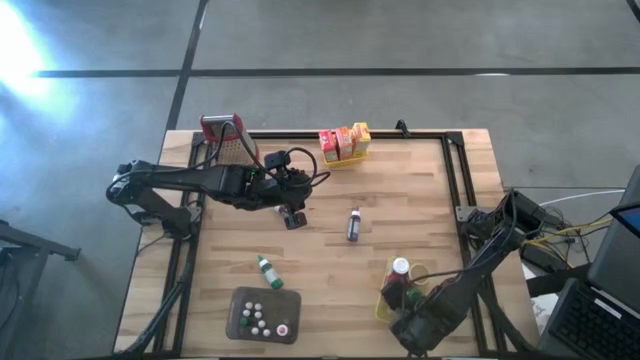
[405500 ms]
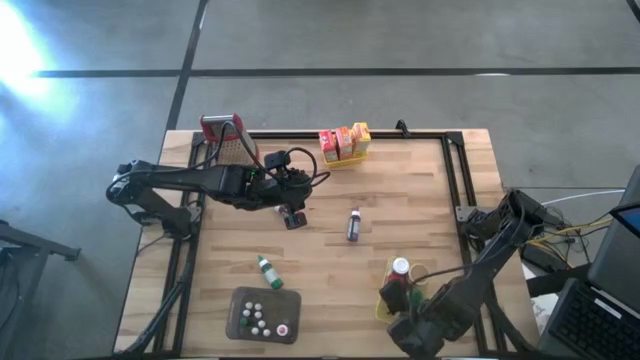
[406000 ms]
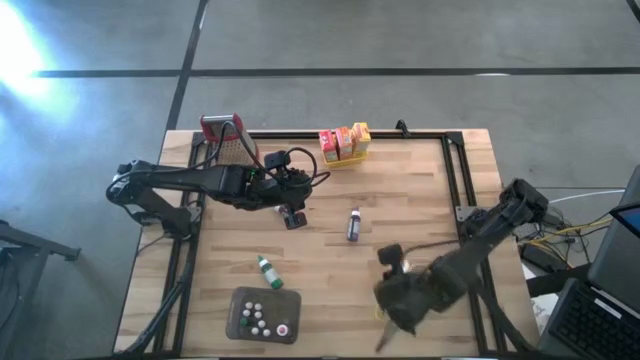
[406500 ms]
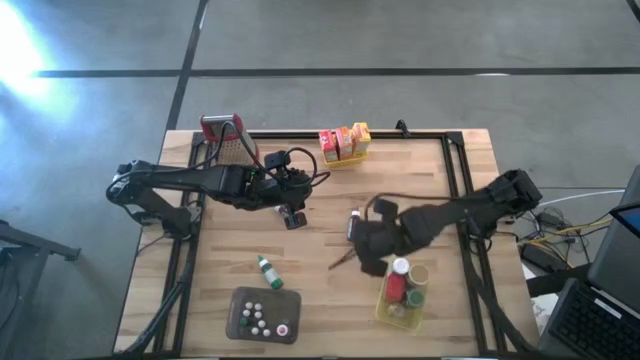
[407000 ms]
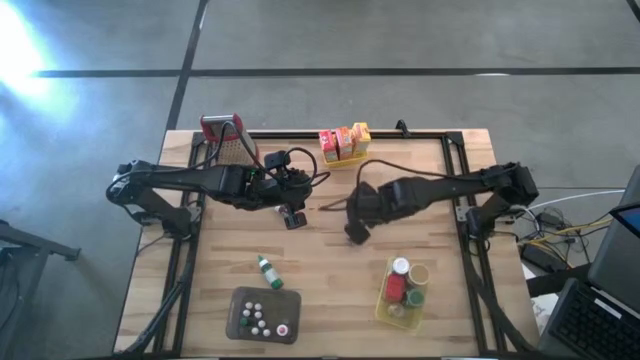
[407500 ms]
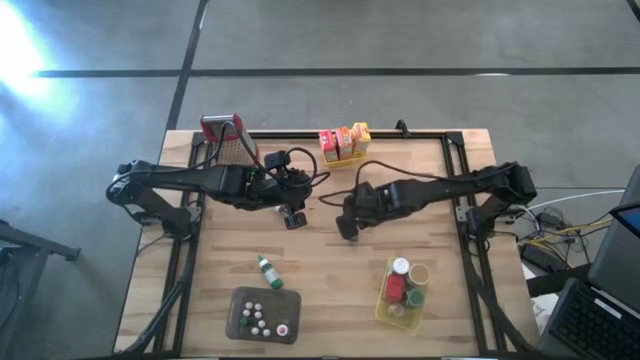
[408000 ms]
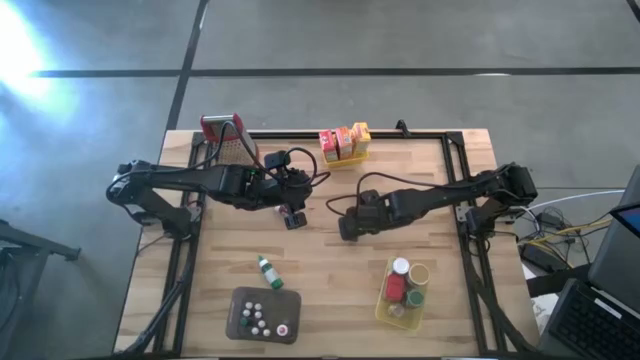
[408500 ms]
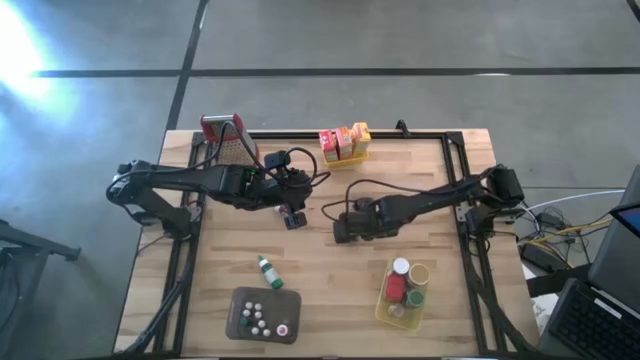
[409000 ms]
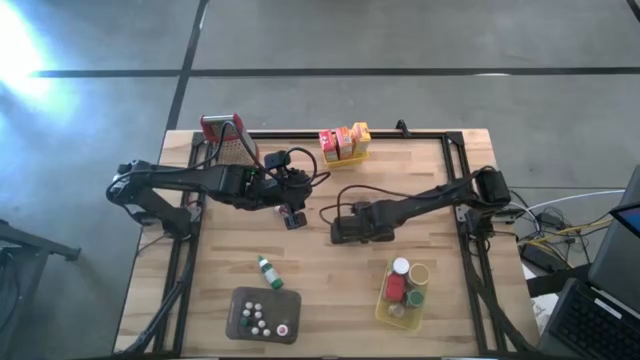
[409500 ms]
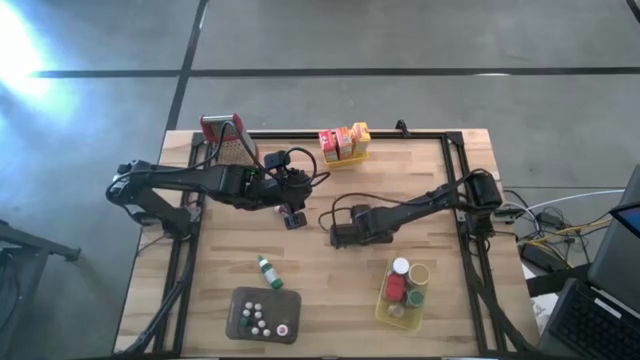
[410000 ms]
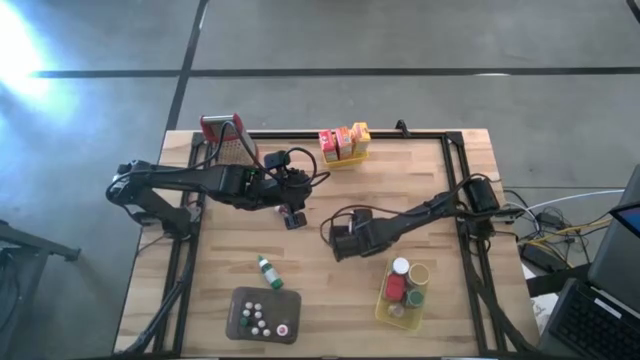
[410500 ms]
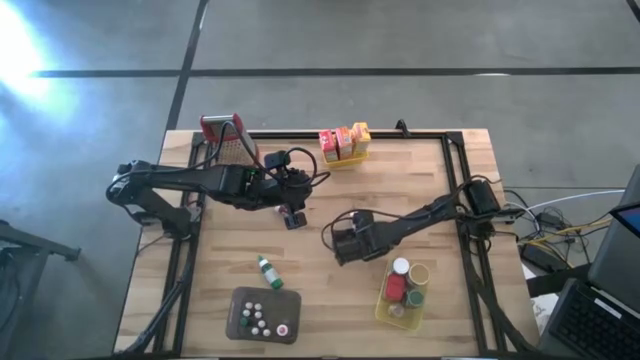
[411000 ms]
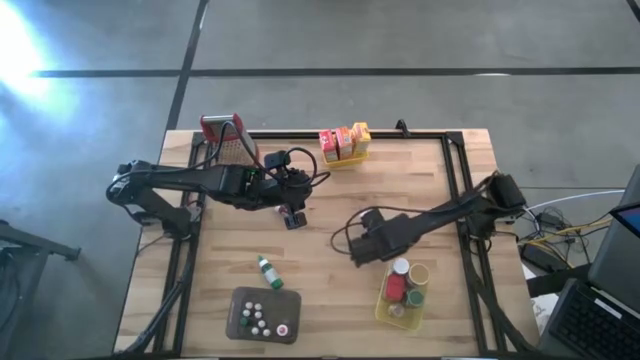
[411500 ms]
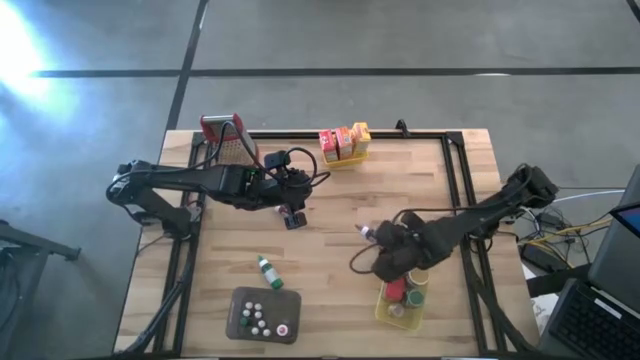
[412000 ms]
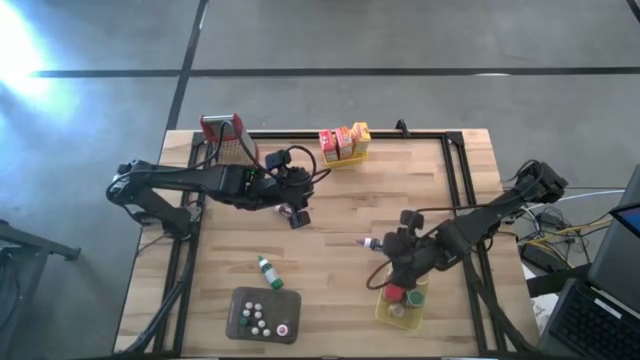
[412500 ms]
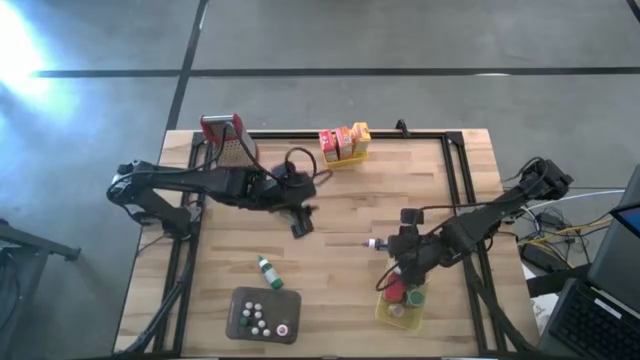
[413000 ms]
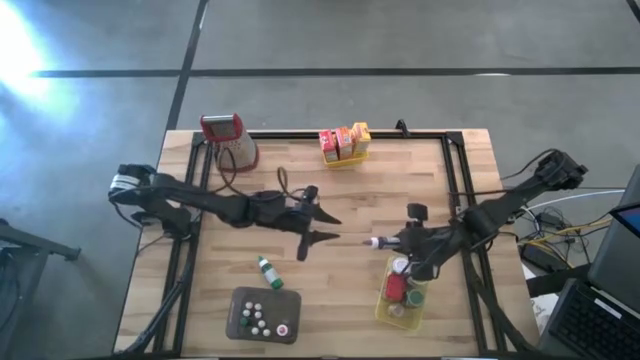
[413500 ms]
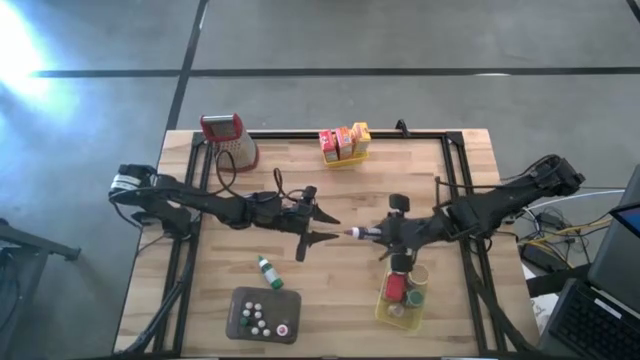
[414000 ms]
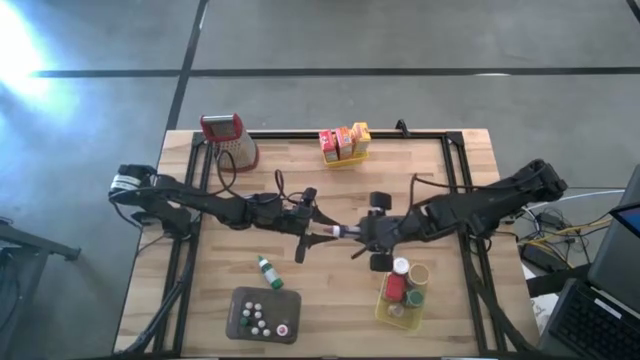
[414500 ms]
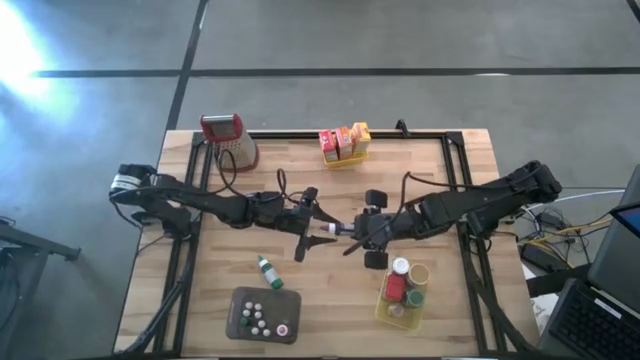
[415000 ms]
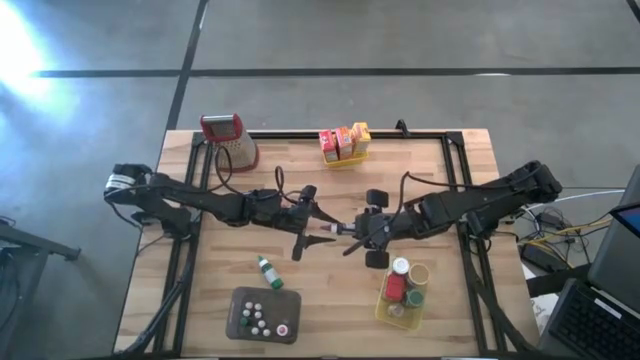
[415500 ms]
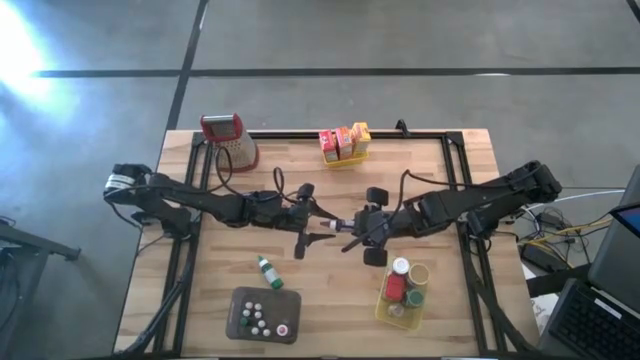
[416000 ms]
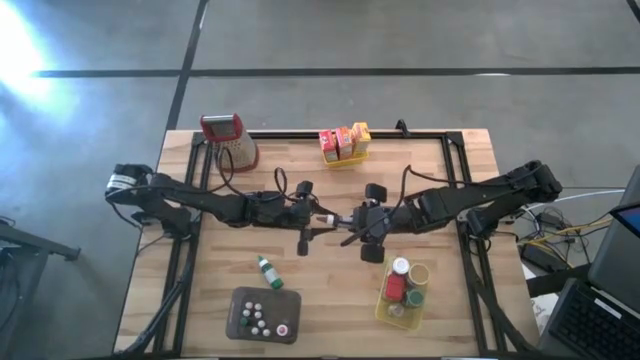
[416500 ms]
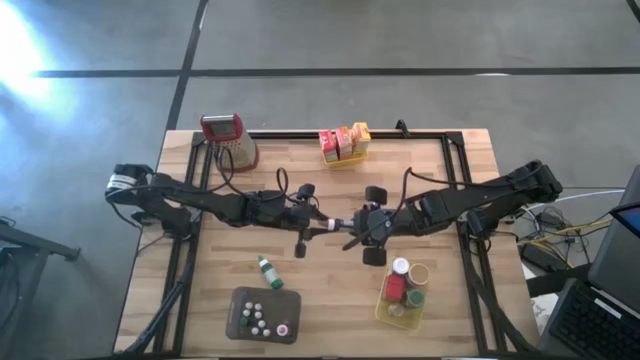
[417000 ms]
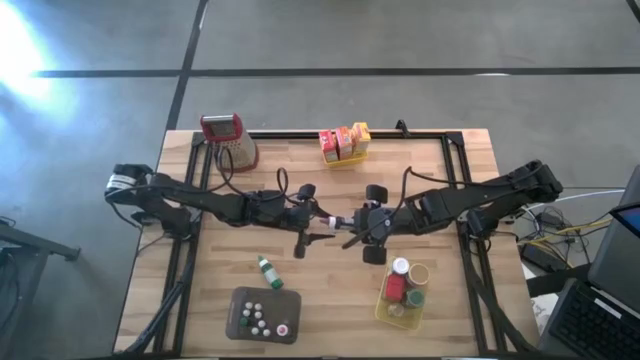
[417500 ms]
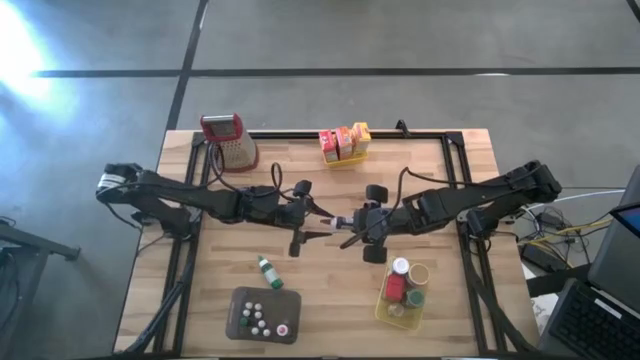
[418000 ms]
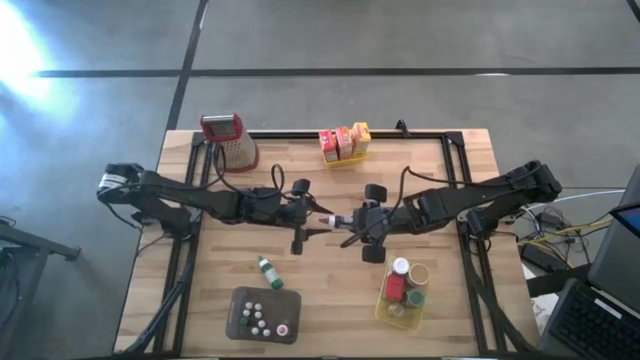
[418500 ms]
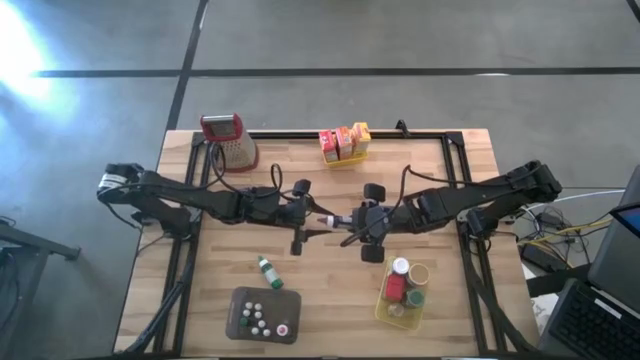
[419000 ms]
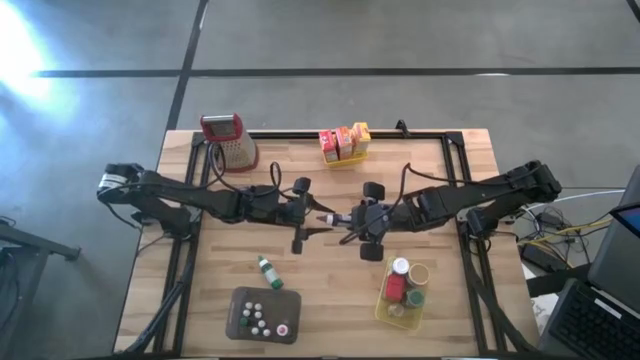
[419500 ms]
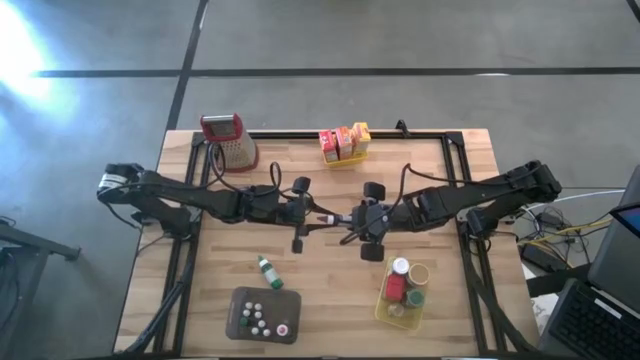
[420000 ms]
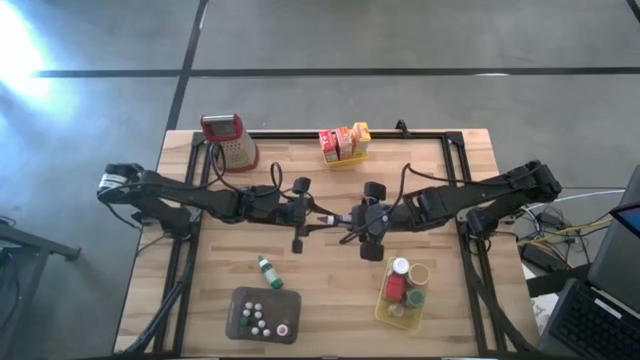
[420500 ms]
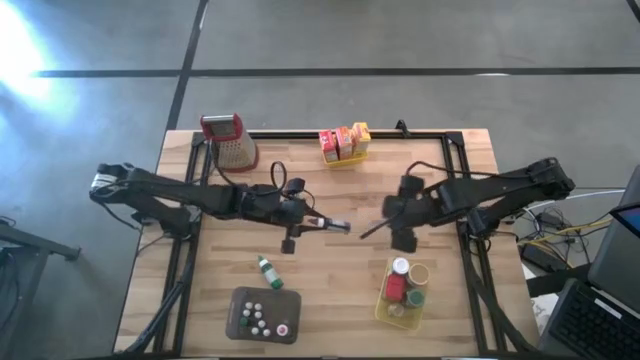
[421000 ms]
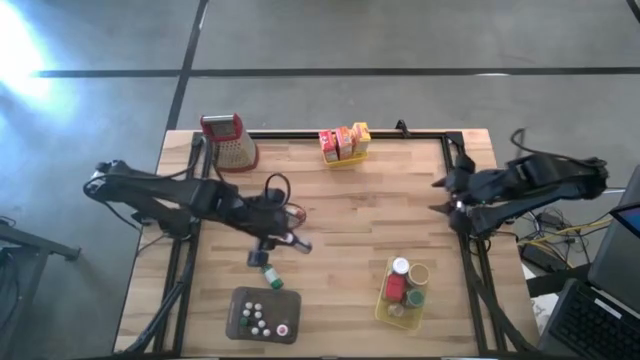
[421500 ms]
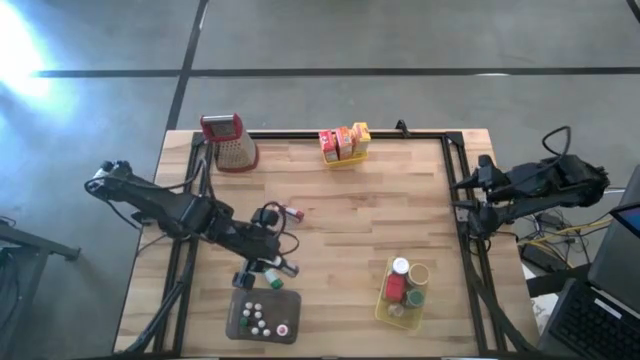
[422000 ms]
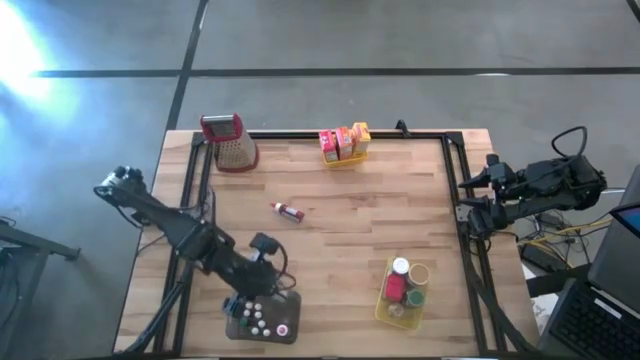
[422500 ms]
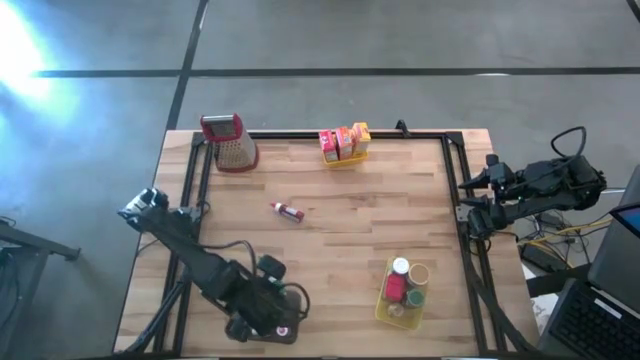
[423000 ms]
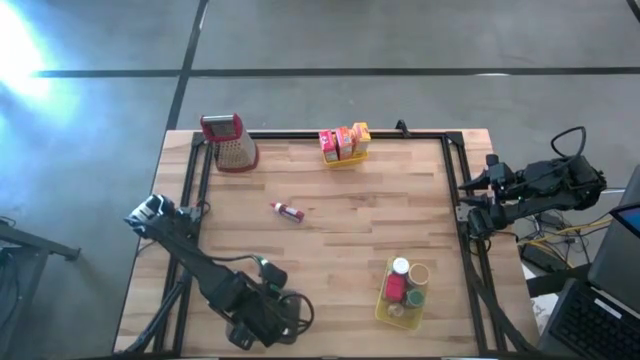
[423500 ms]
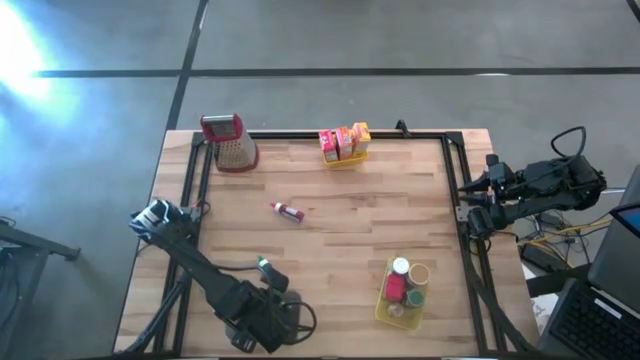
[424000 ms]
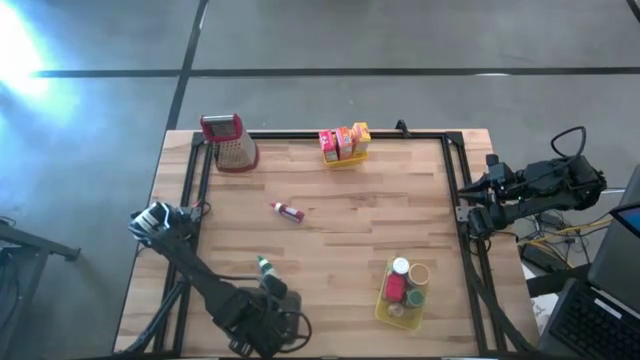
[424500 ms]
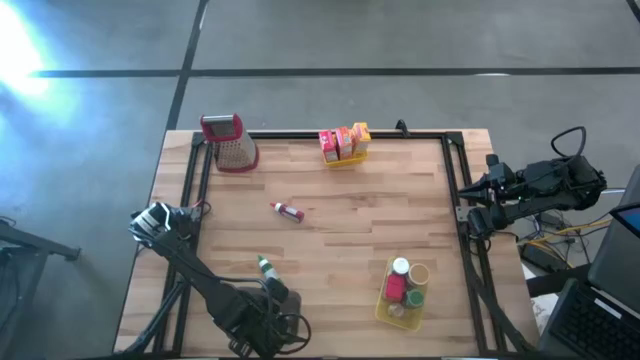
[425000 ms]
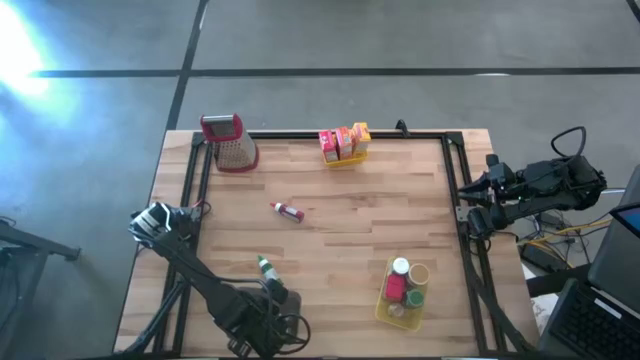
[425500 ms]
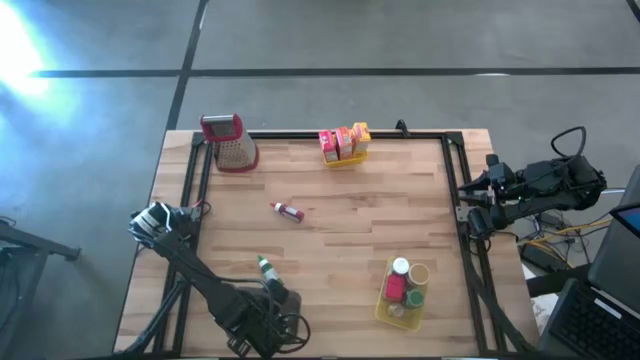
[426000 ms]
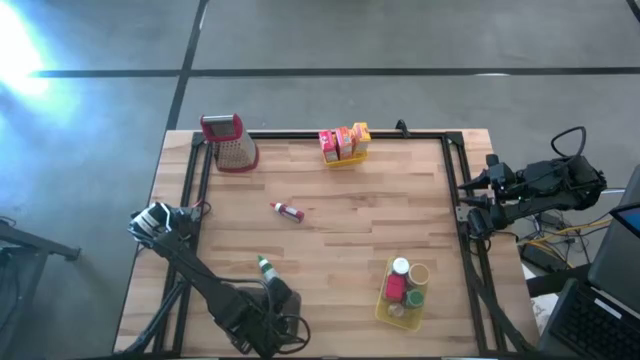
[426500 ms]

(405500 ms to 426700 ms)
Task: Pick & Place Kitchen Items
Put the large violet food coloring bottle into the black bin
